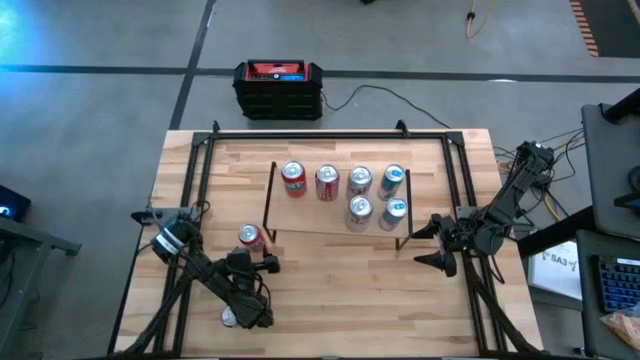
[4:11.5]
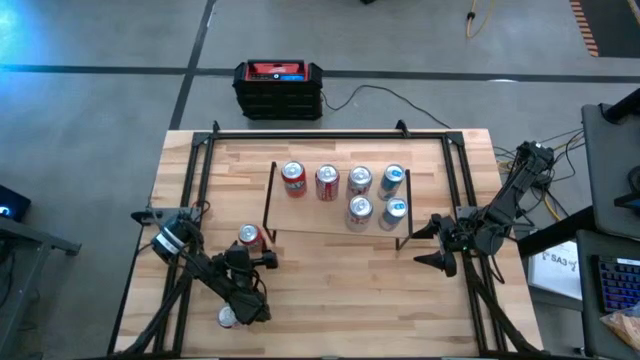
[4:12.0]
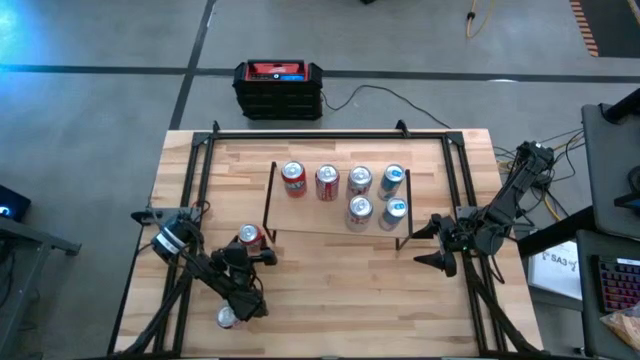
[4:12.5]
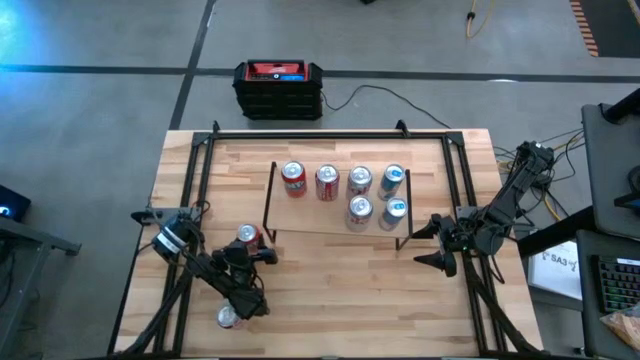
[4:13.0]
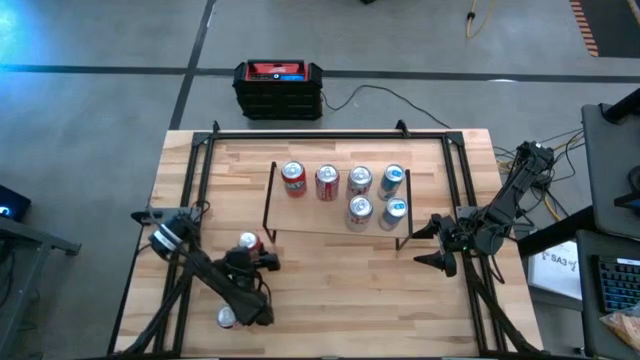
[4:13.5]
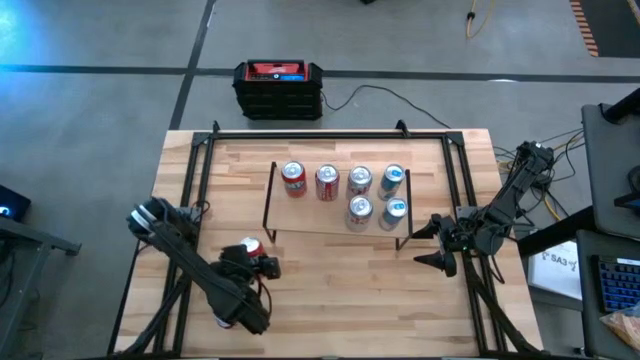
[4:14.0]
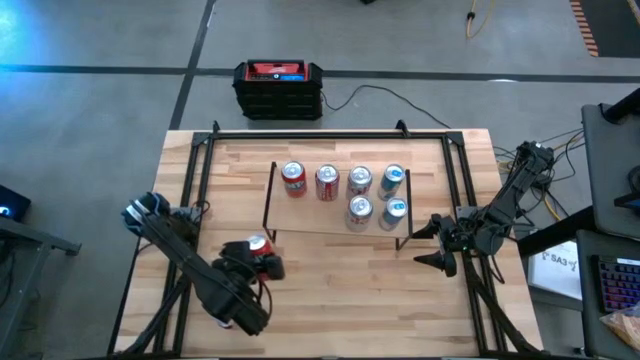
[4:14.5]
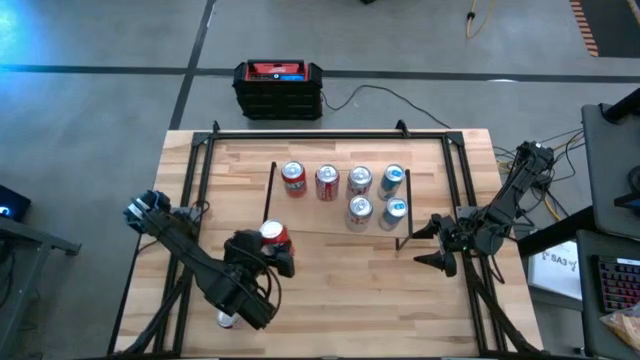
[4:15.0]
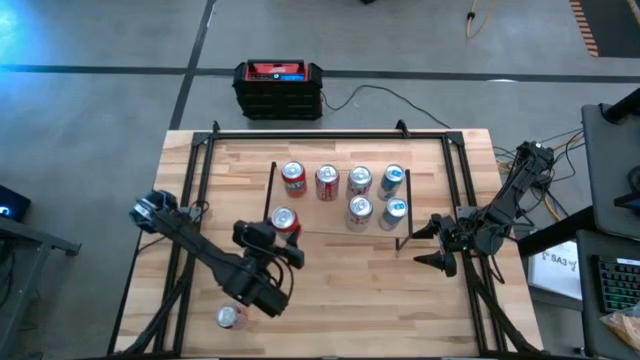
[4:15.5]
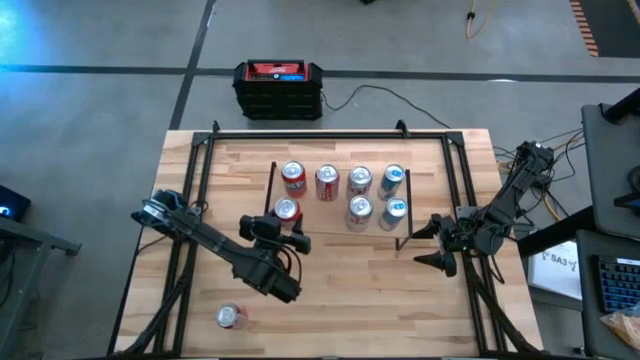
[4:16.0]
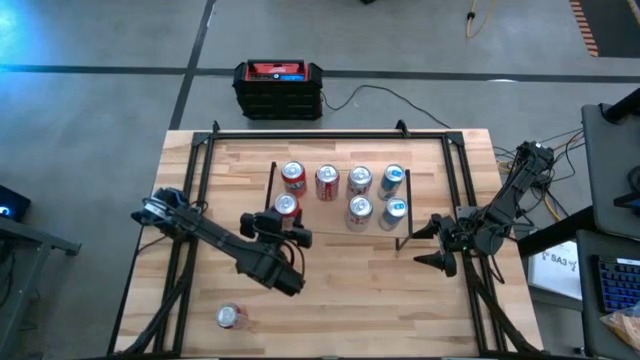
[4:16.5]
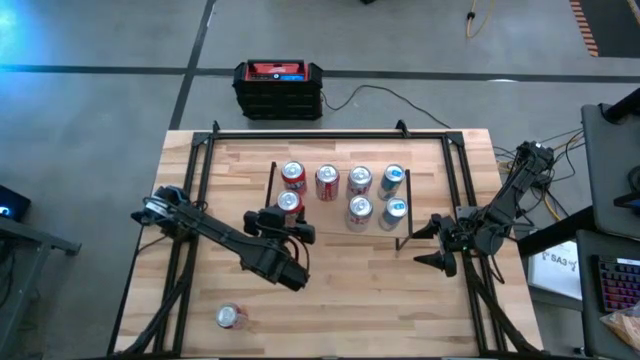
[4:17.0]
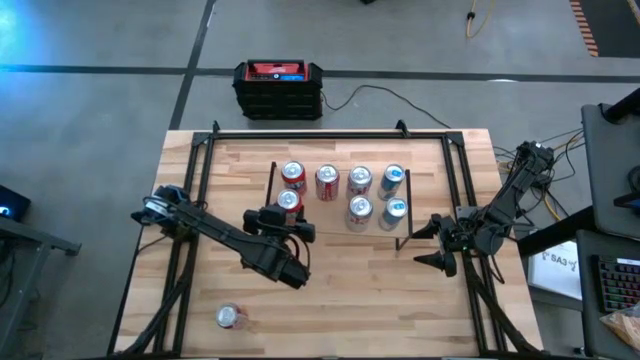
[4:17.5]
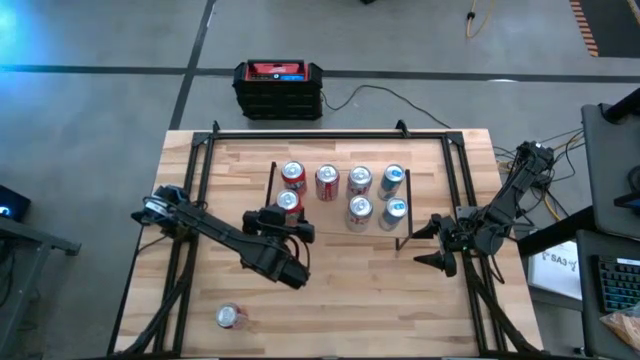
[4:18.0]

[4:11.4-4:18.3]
Task: Place canned beverage on shelf
Put the red soda can on the shelf aligned with the other red soda can

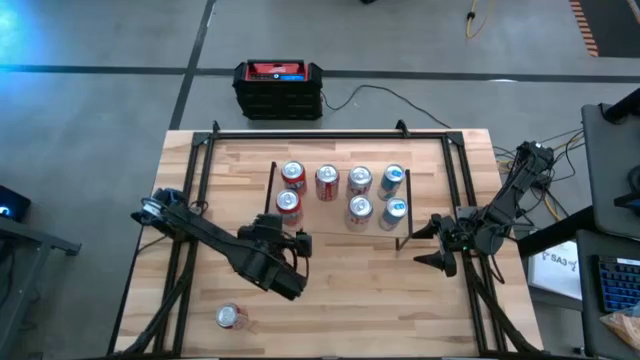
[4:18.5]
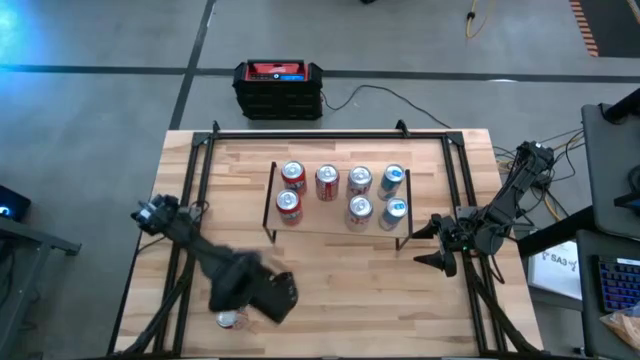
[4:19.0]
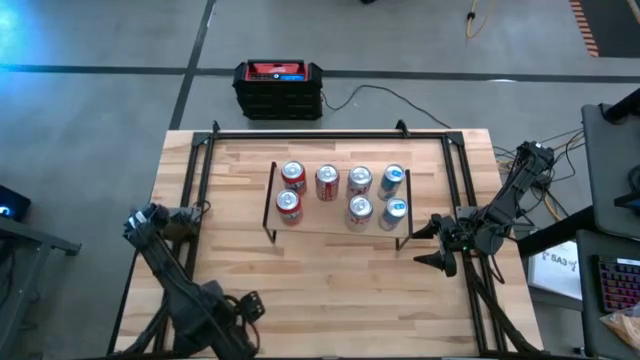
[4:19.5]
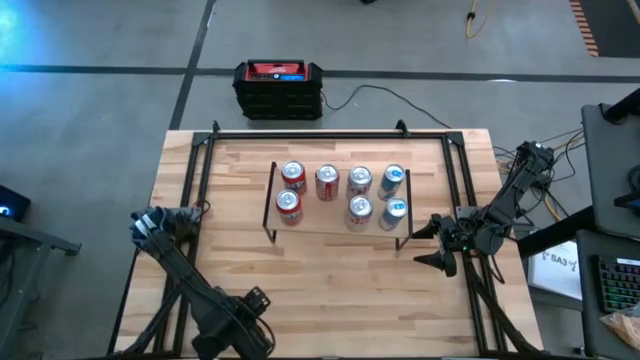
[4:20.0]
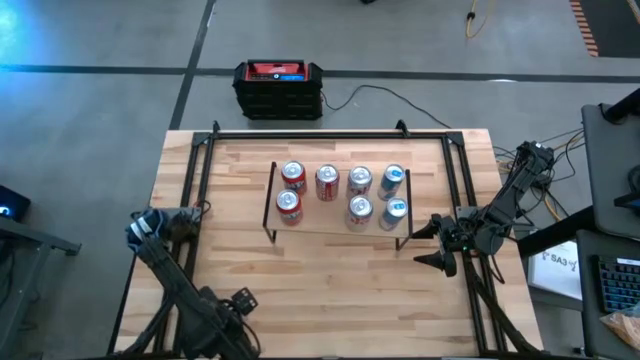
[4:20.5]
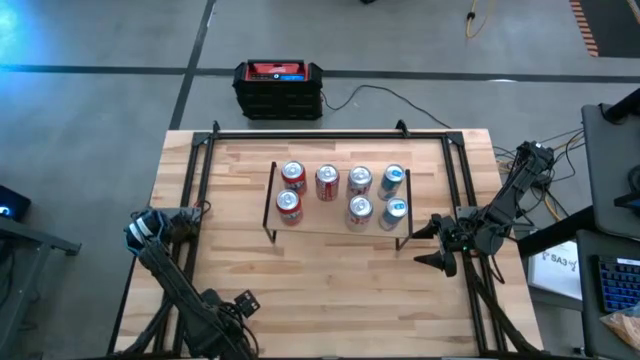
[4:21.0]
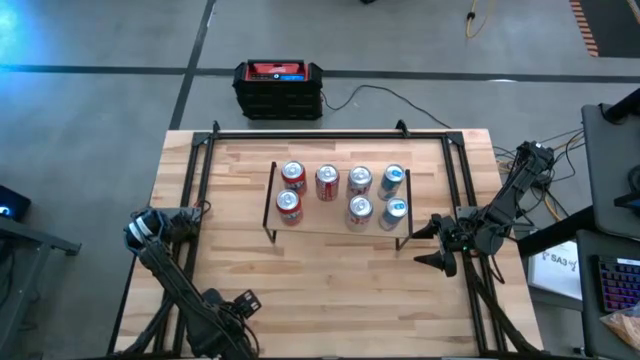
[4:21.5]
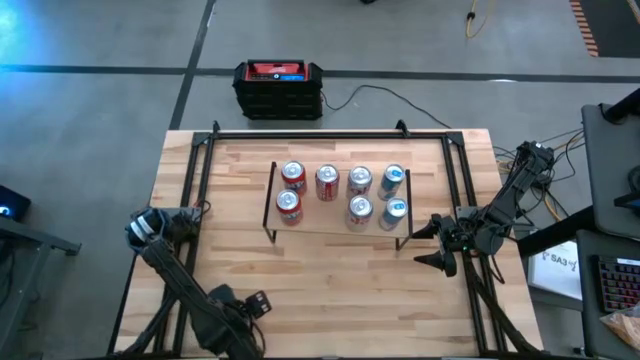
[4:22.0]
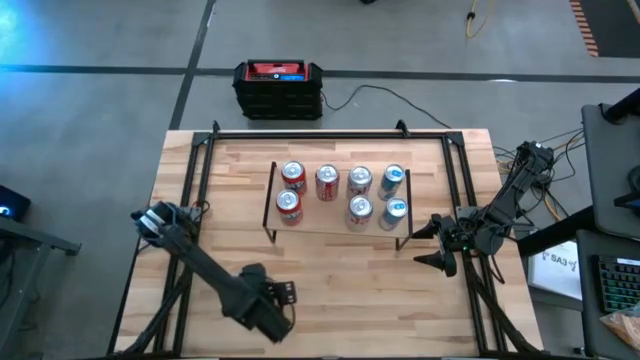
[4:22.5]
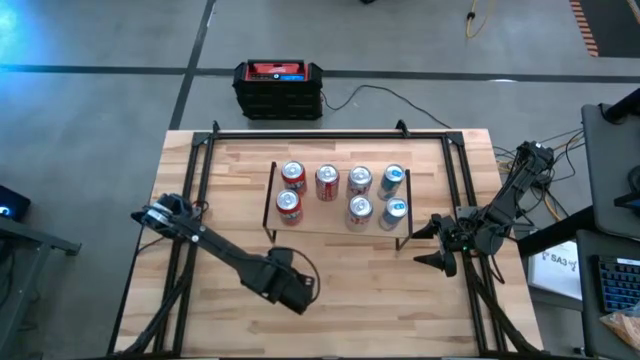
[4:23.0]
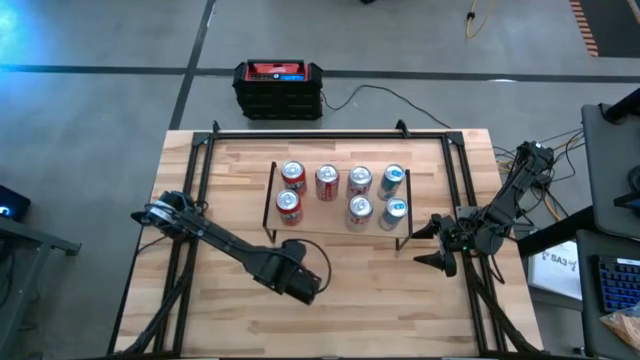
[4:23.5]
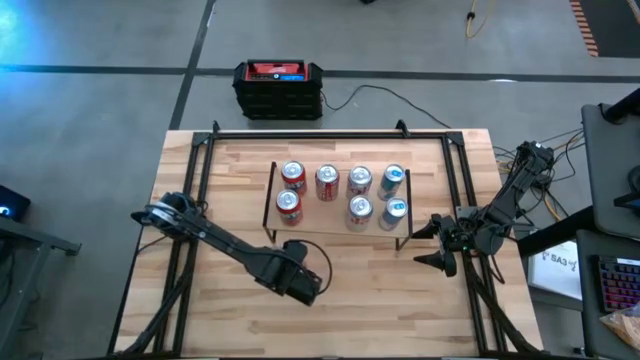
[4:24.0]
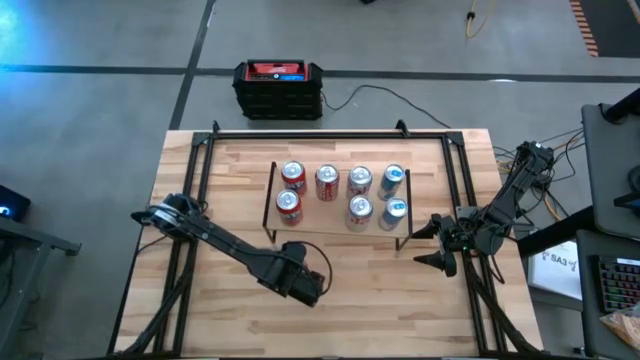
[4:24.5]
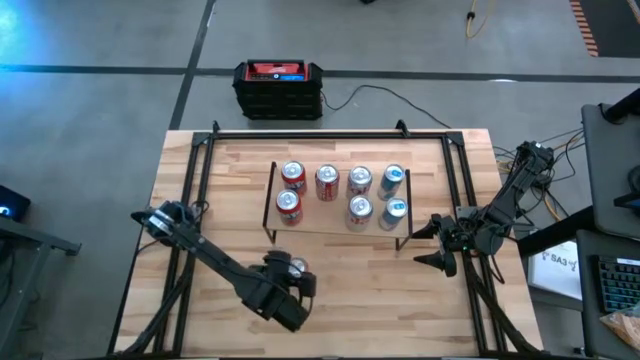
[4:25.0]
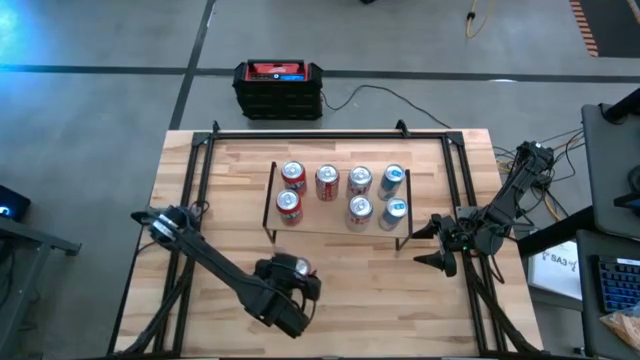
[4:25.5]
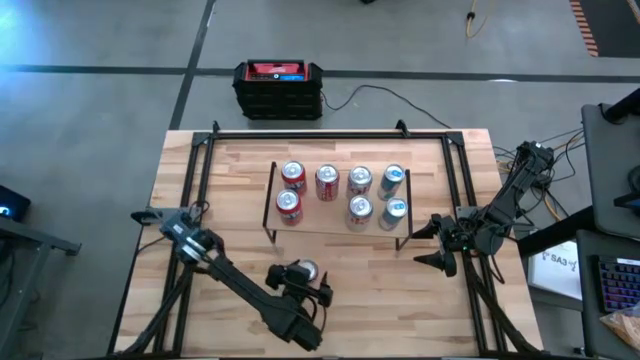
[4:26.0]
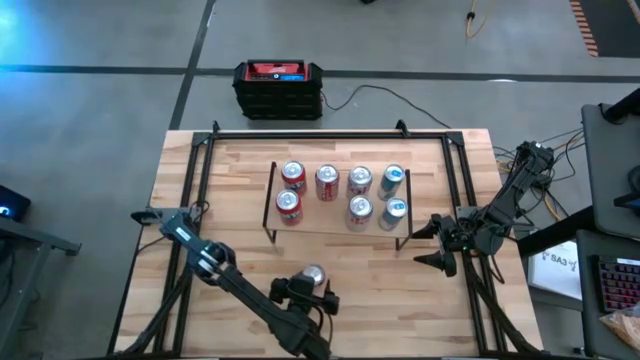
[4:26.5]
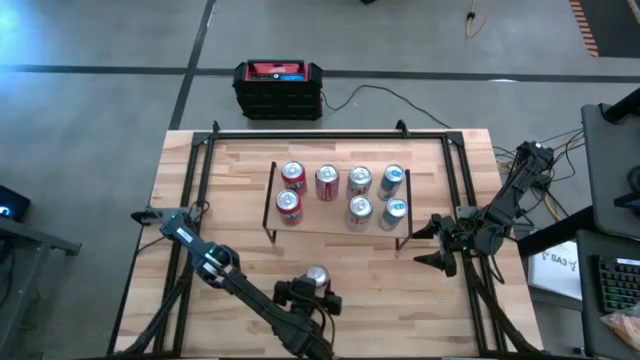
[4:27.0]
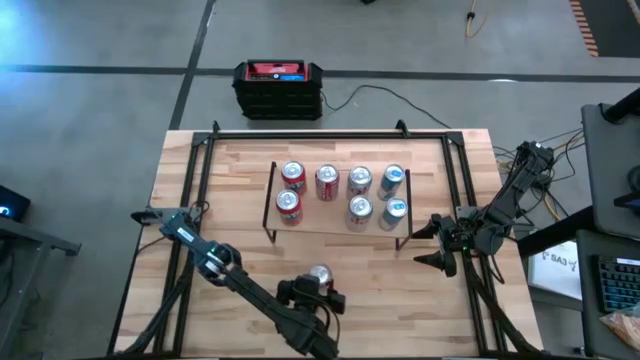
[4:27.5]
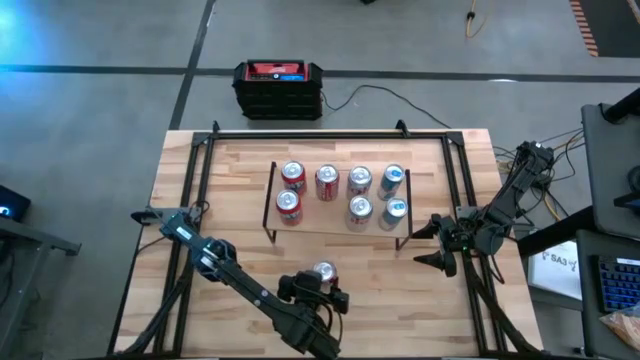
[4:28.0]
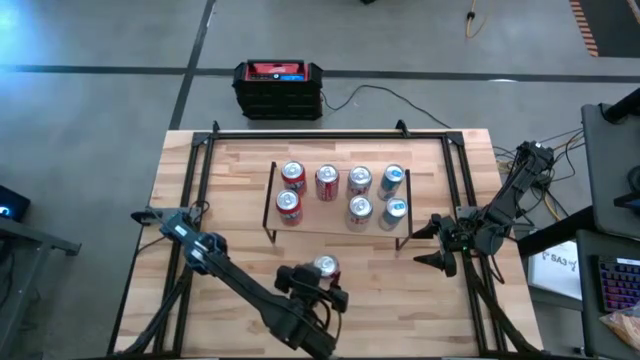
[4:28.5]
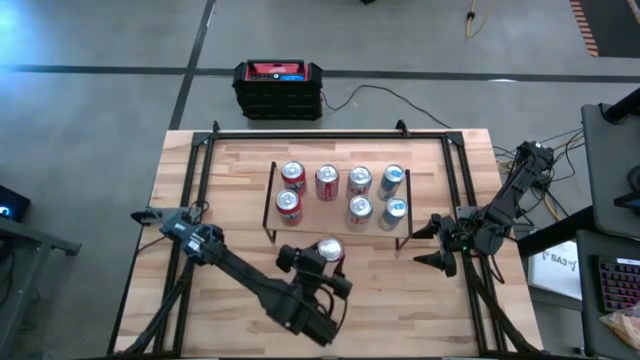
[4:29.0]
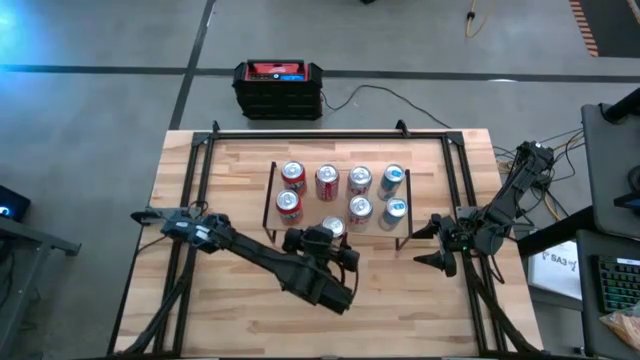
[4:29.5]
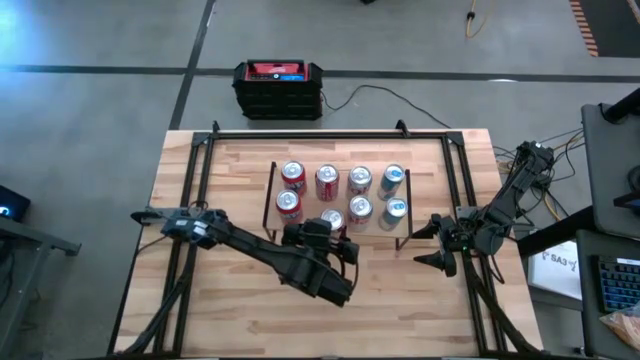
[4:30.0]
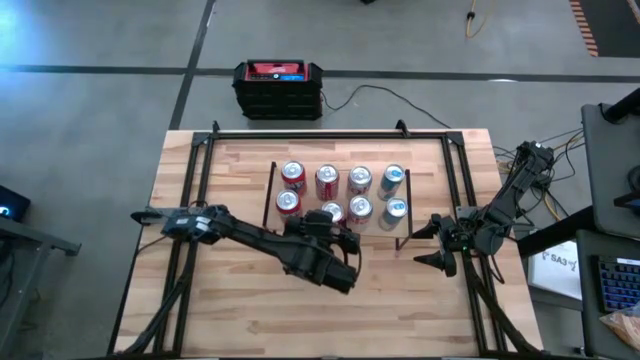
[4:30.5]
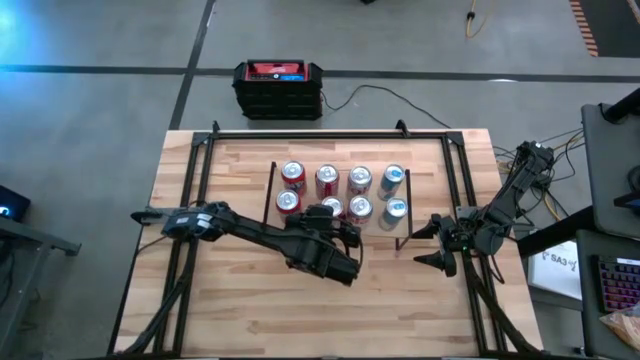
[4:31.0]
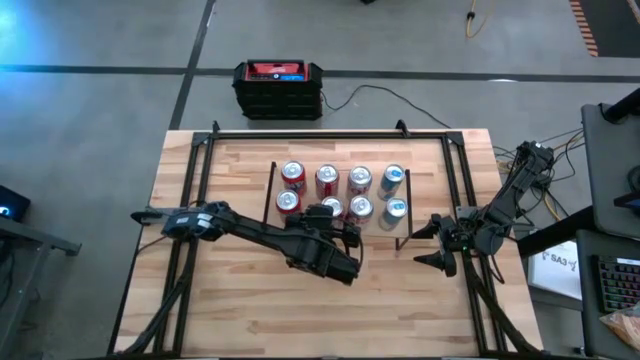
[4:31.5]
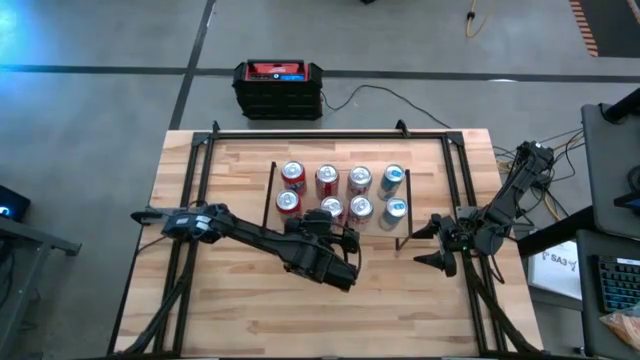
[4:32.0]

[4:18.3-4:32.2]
Put the red white soda can on the shelf aligned with the other red white soda can
